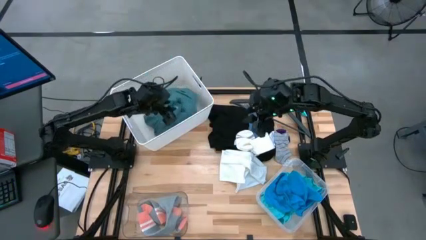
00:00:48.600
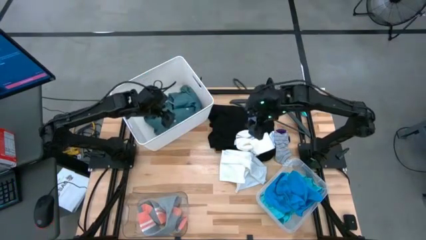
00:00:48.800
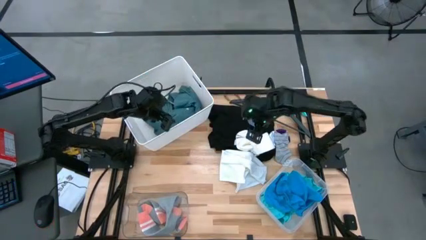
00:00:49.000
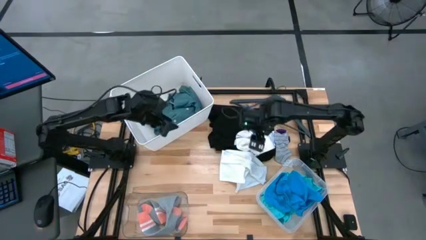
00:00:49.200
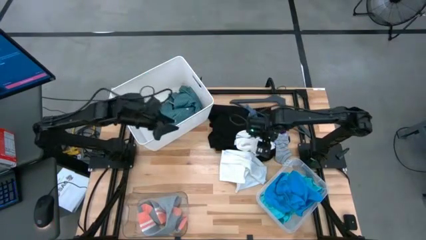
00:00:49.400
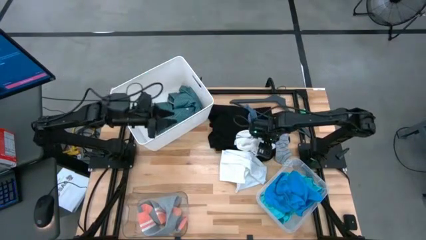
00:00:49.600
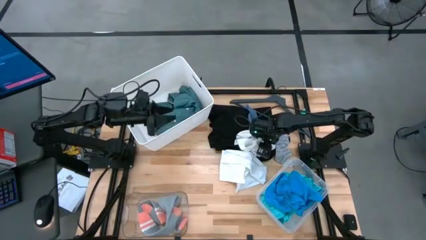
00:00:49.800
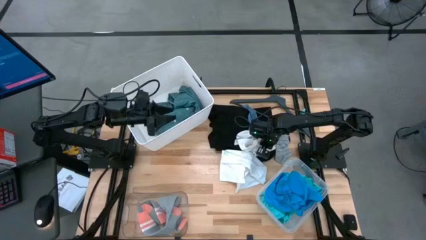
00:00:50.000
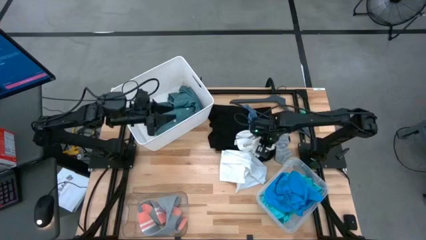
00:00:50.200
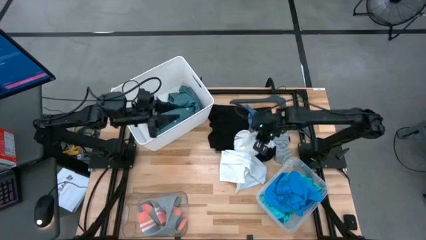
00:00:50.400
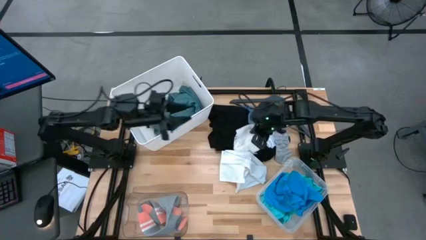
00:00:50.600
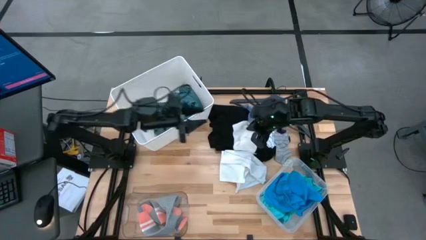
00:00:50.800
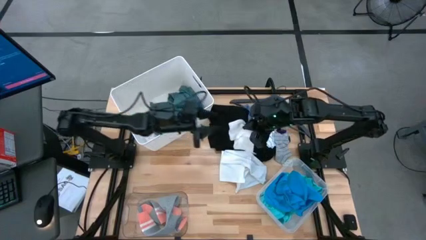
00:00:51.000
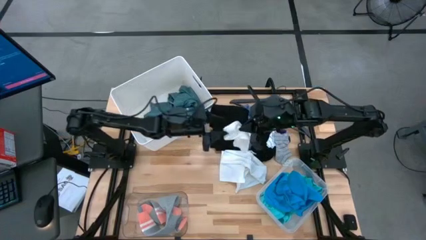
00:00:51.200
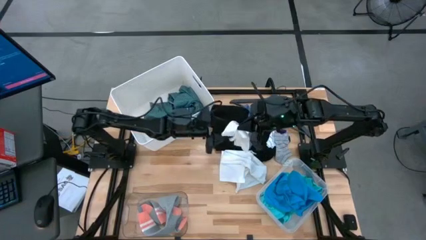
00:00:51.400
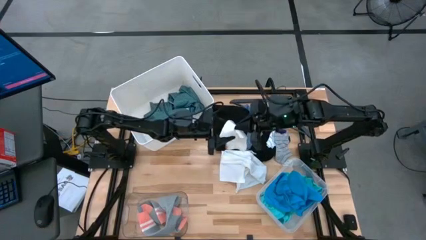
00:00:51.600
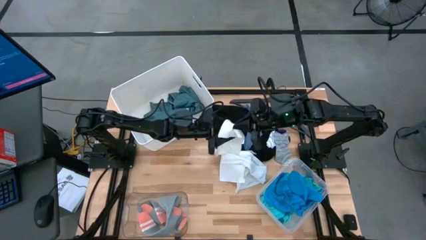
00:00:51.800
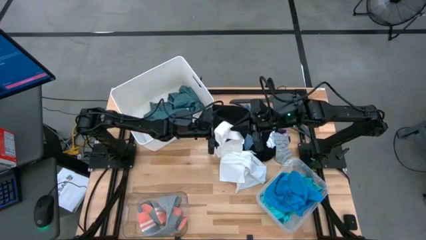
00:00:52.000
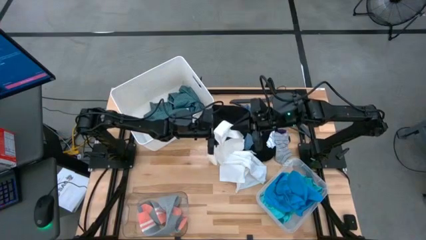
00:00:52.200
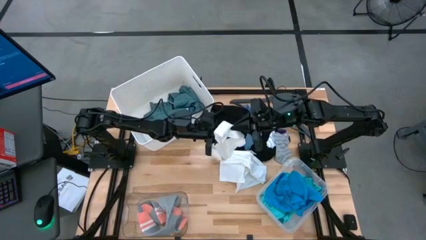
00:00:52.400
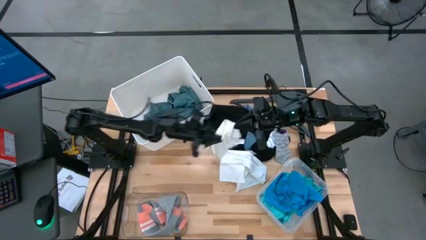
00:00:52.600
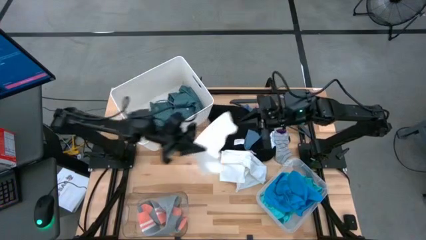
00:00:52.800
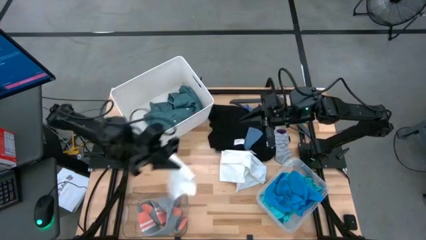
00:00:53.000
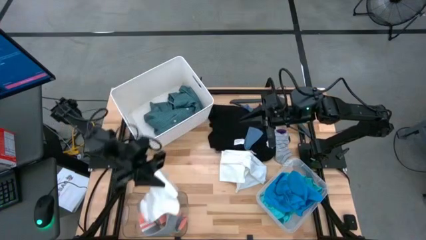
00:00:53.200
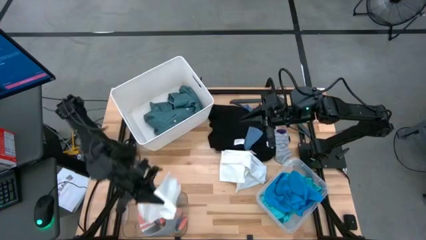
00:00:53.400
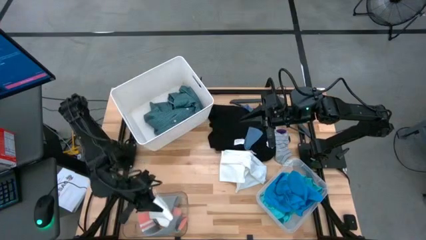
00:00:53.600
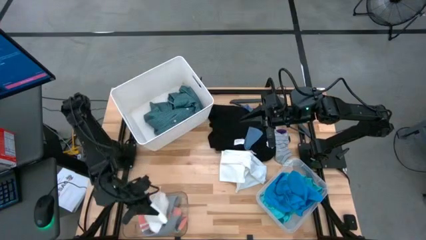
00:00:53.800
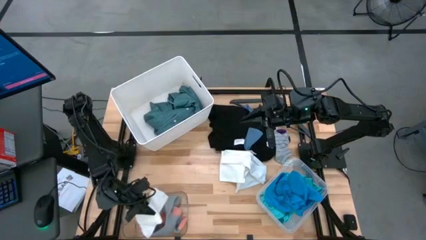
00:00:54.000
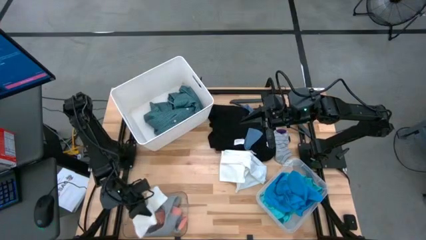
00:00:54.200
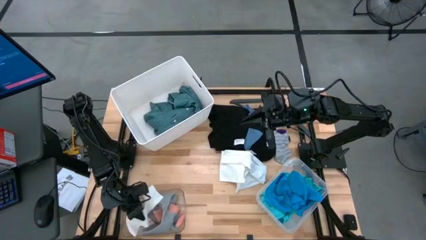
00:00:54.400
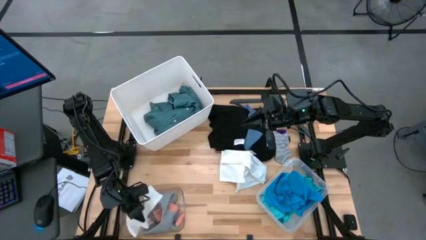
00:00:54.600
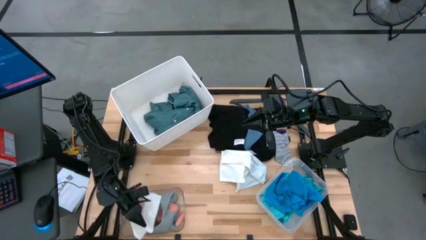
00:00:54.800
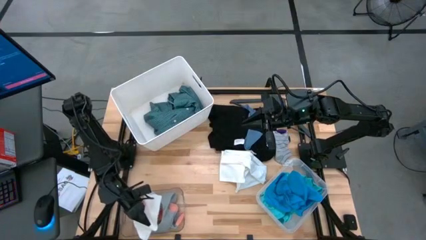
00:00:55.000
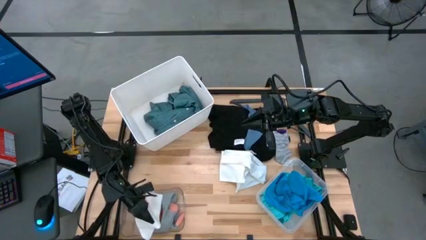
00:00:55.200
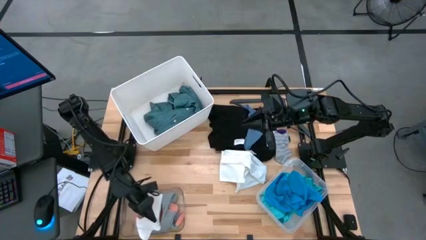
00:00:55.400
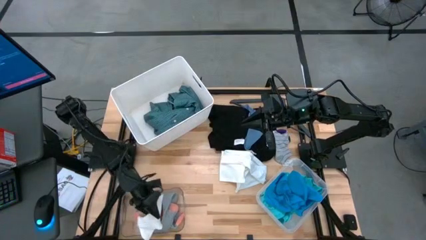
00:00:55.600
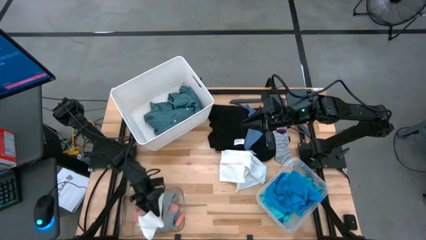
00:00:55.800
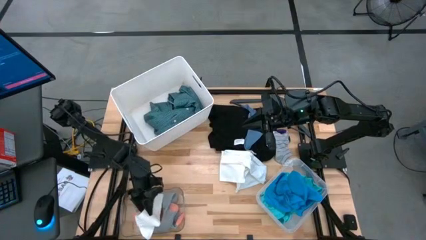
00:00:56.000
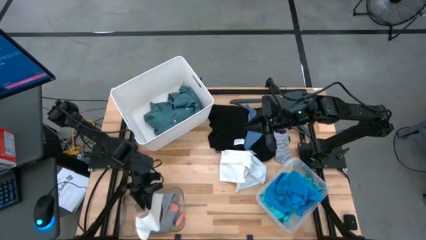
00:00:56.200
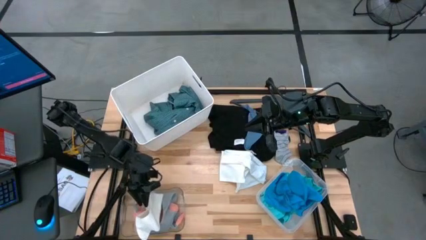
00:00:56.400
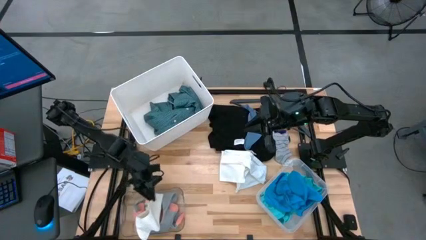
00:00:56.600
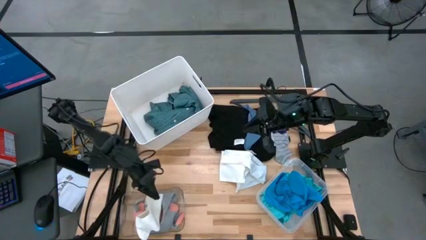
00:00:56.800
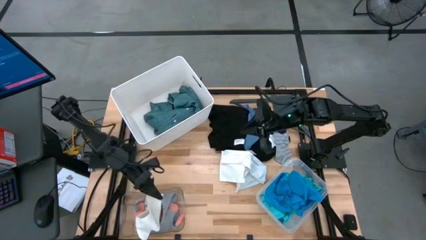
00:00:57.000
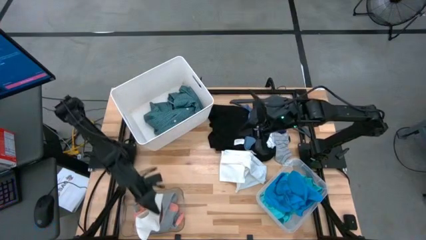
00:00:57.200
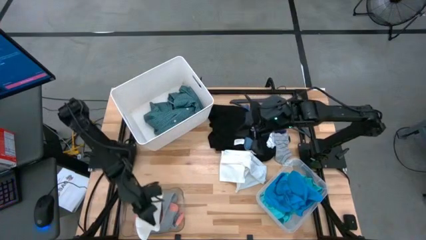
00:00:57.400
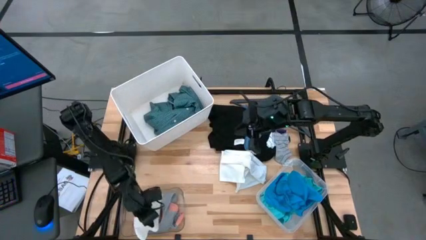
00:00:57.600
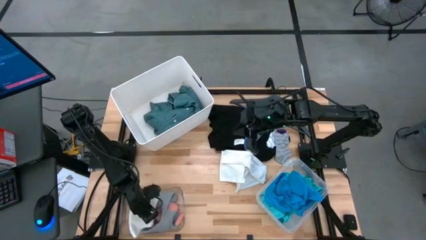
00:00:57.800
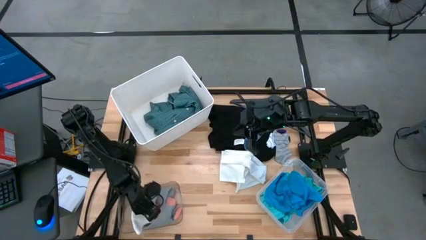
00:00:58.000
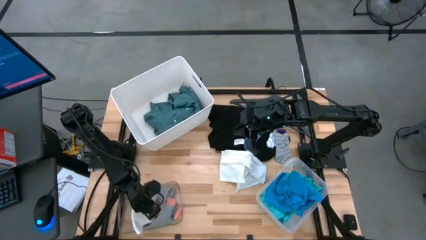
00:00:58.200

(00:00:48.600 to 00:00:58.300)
Task: Pick & Place Cloths
Put the top white sock into the left transparent bin

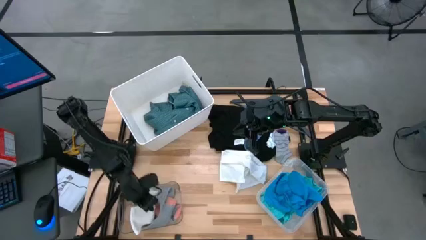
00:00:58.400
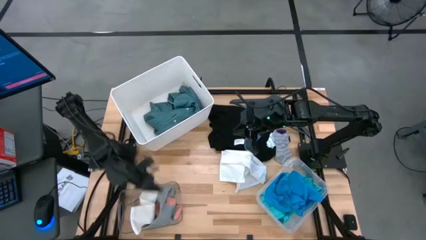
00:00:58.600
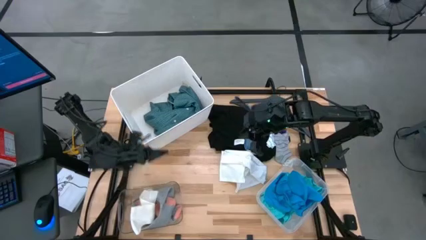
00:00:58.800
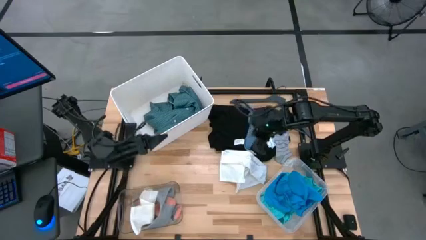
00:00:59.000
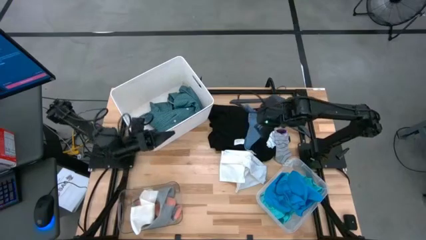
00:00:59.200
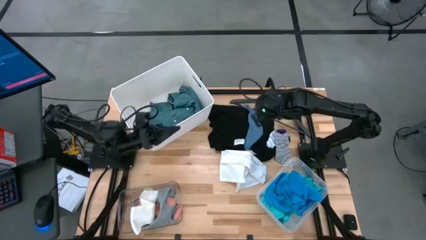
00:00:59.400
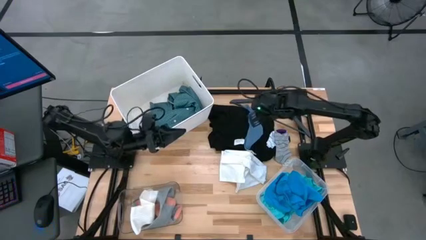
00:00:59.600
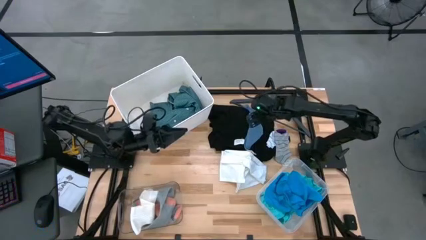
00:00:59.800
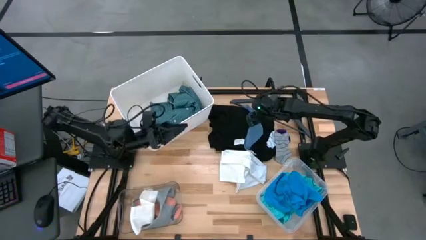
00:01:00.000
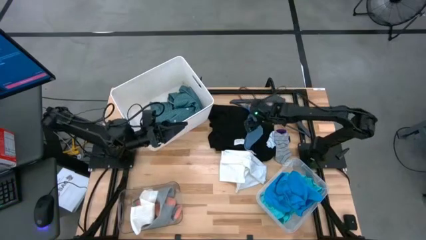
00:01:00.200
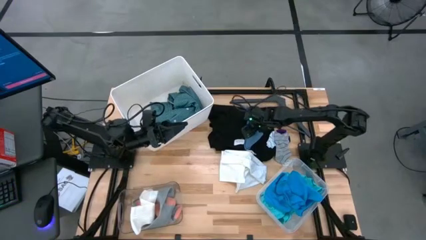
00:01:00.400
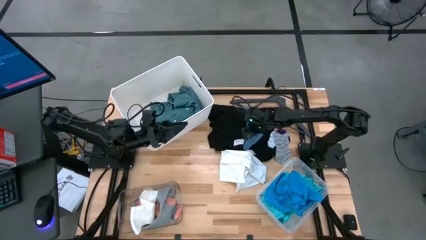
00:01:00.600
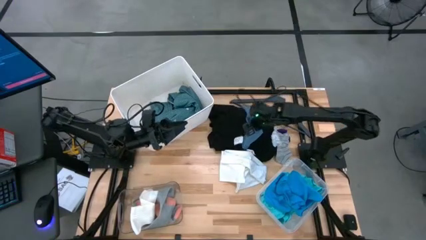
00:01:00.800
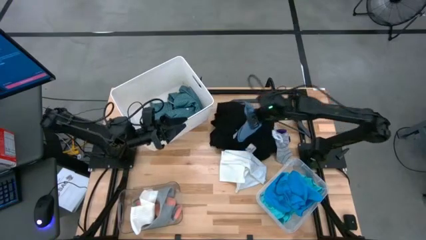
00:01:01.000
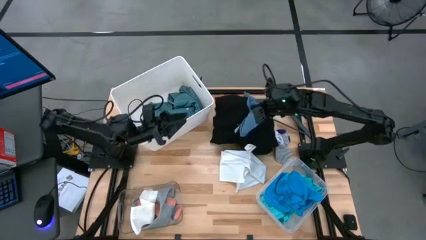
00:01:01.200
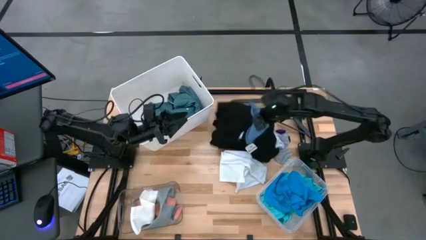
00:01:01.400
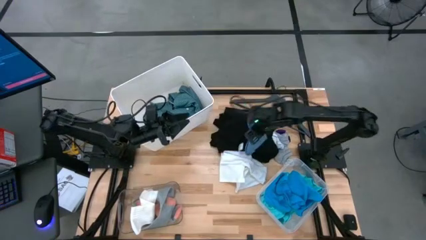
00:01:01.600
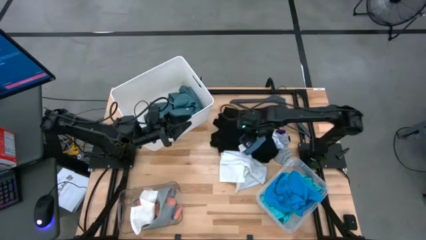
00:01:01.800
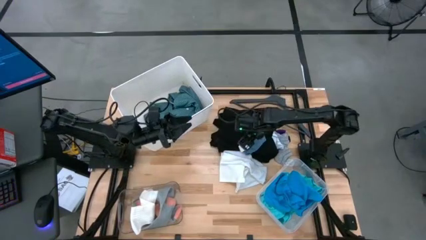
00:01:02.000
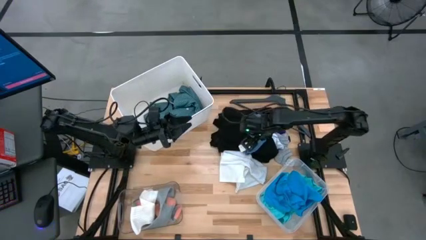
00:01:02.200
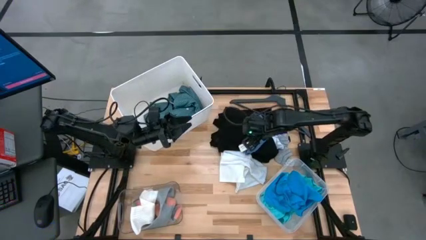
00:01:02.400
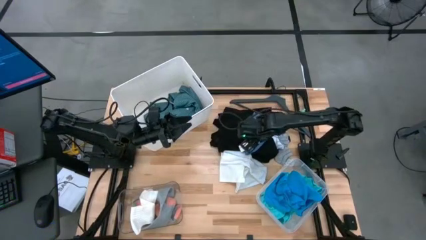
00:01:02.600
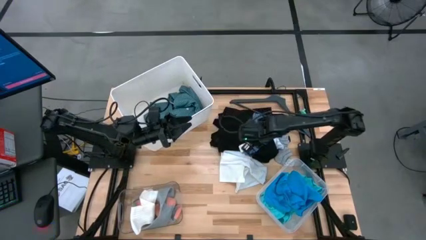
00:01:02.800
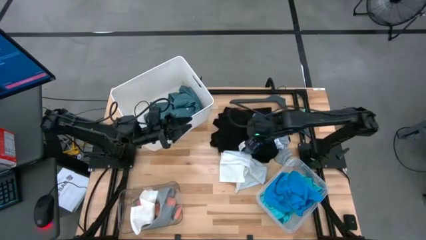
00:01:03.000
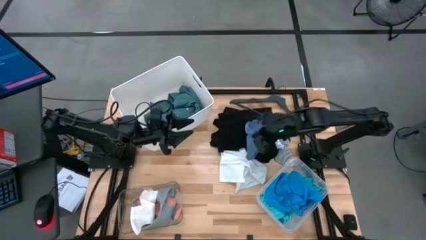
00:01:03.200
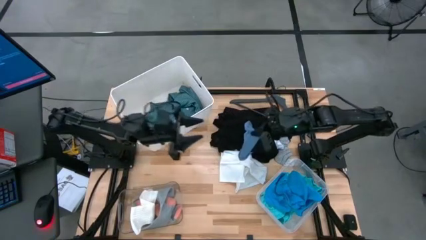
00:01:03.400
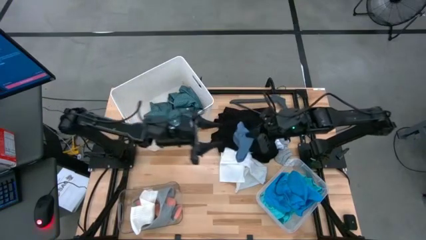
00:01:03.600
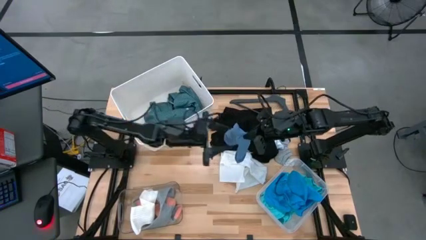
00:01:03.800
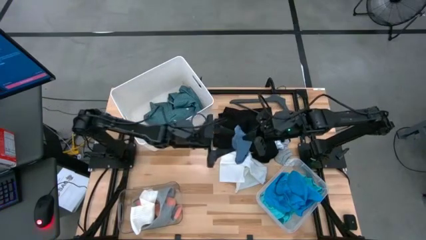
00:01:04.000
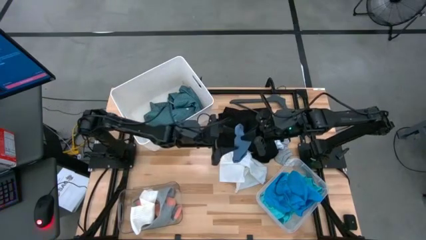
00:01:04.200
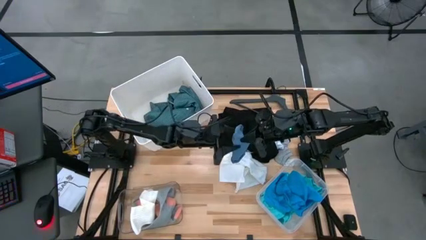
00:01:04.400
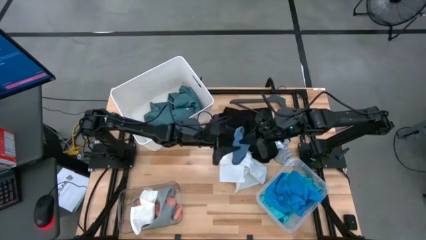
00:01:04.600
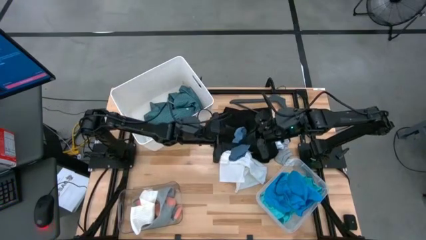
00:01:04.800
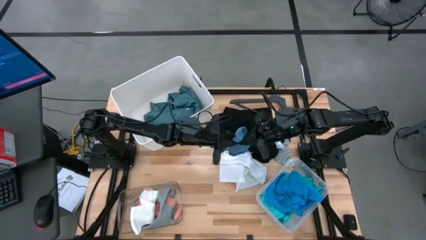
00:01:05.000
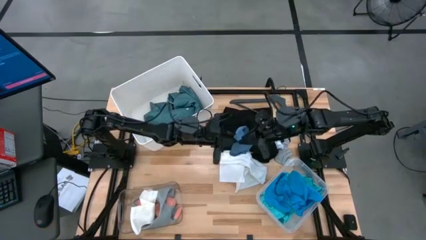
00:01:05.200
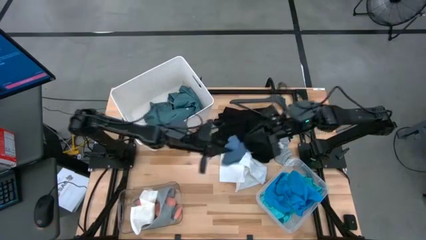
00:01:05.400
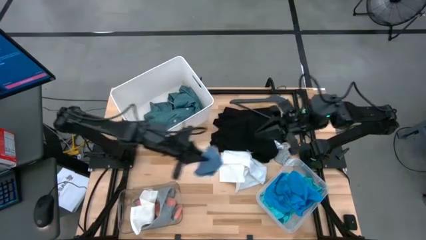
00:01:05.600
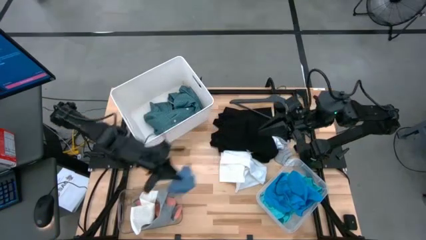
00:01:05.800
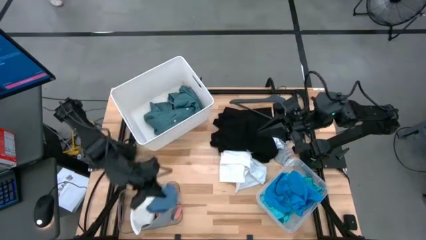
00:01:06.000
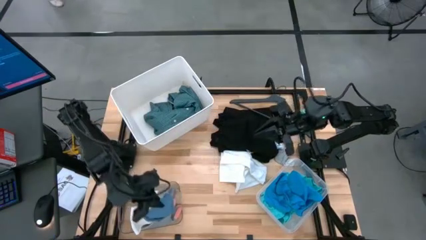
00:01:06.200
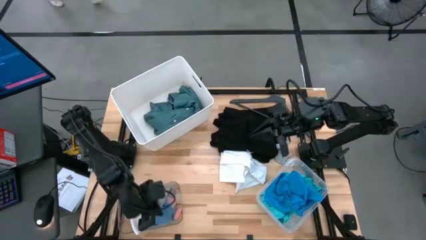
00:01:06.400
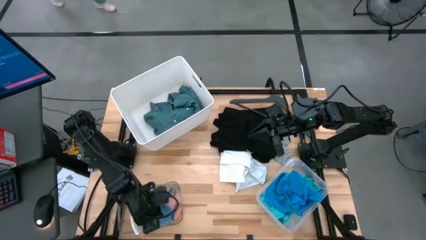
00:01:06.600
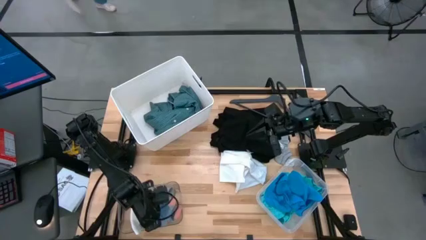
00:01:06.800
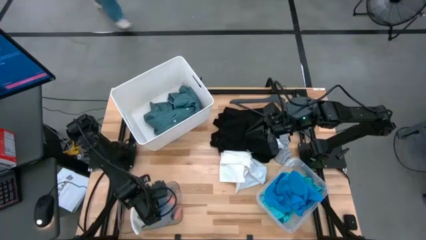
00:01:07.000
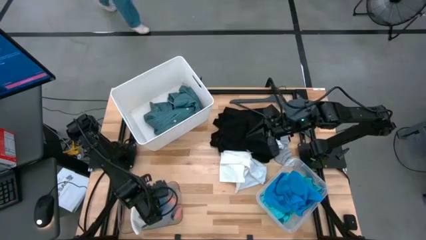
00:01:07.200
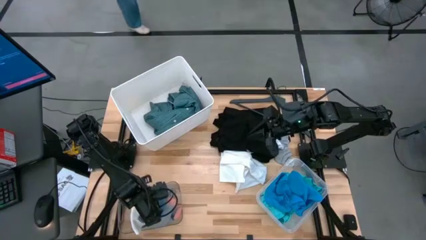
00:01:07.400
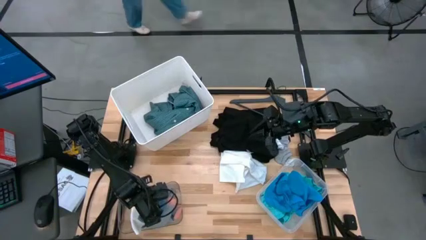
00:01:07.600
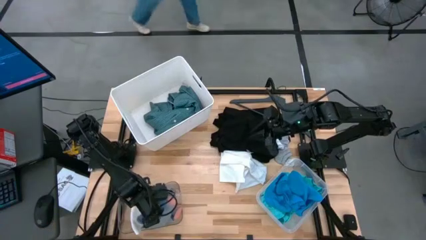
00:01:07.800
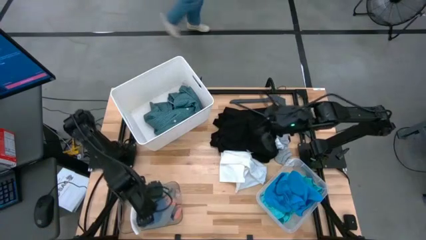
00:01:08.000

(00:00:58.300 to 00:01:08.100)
Put the blue sock into the left transparent bin
